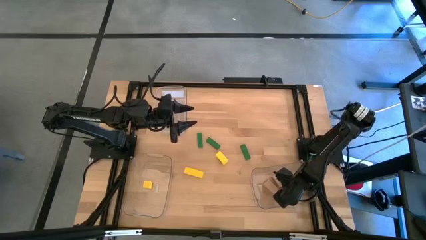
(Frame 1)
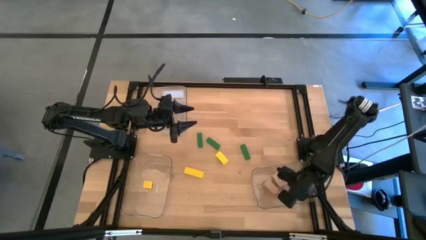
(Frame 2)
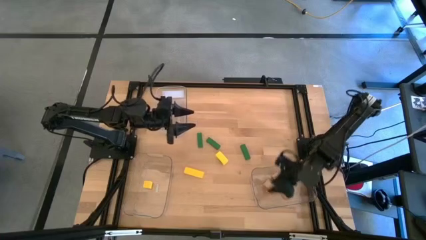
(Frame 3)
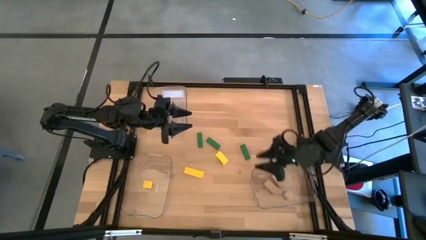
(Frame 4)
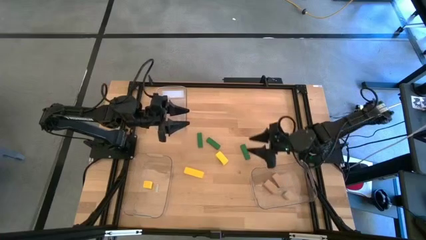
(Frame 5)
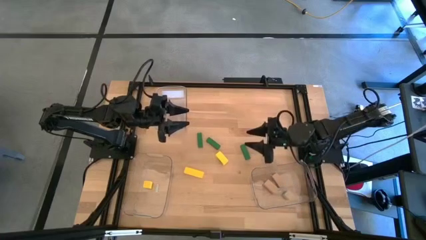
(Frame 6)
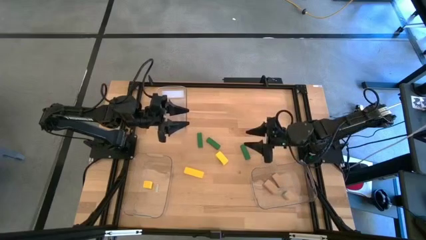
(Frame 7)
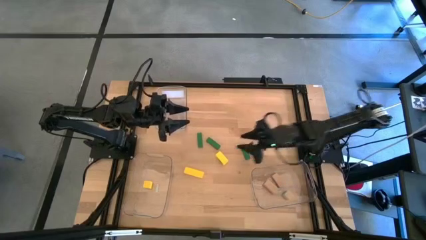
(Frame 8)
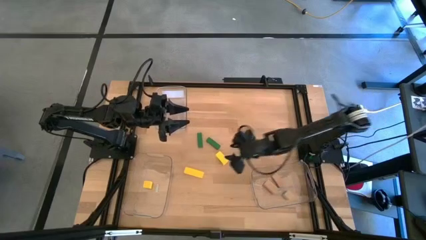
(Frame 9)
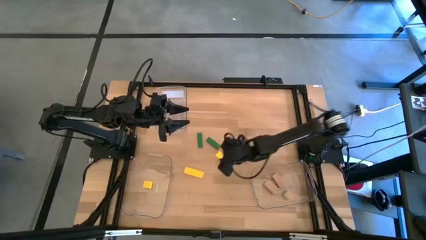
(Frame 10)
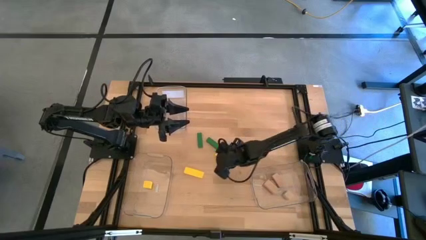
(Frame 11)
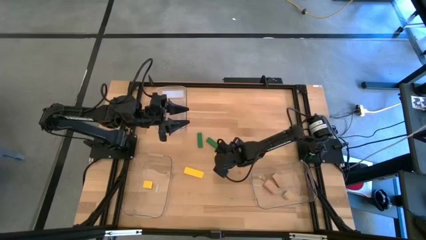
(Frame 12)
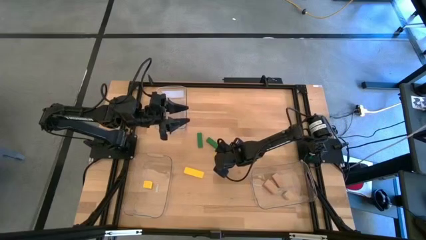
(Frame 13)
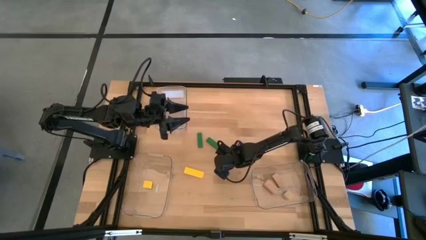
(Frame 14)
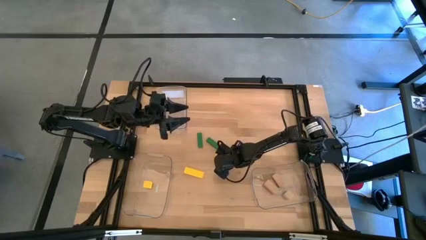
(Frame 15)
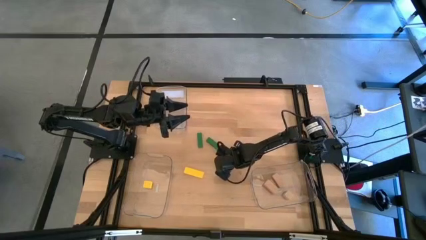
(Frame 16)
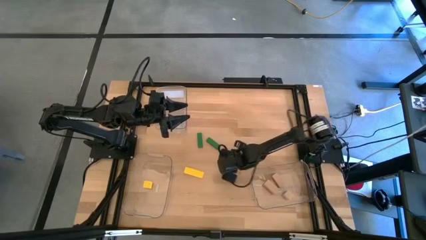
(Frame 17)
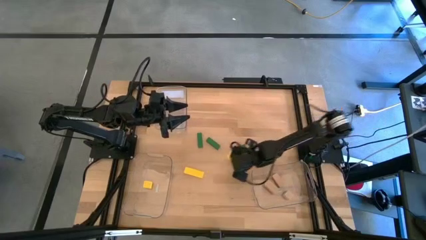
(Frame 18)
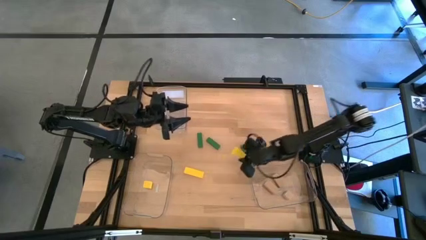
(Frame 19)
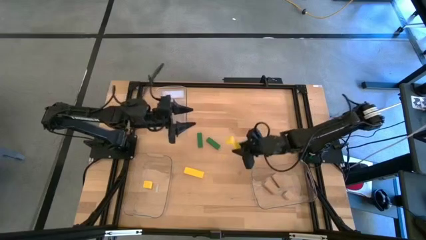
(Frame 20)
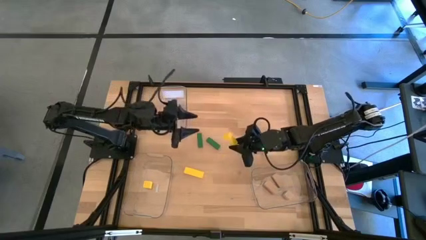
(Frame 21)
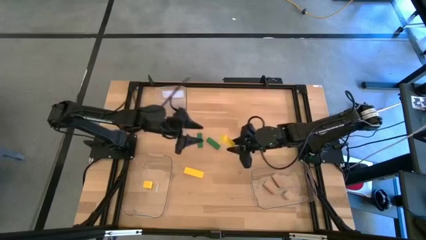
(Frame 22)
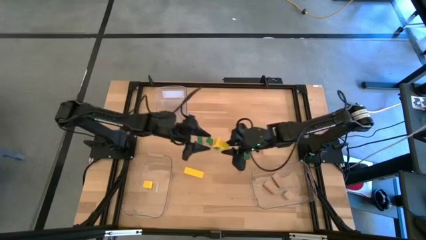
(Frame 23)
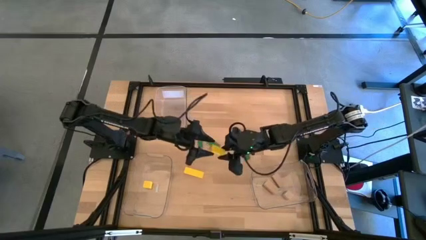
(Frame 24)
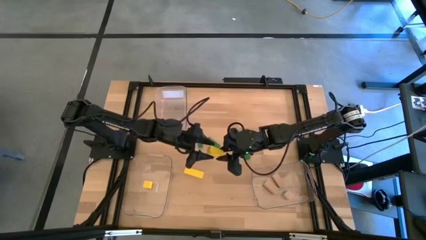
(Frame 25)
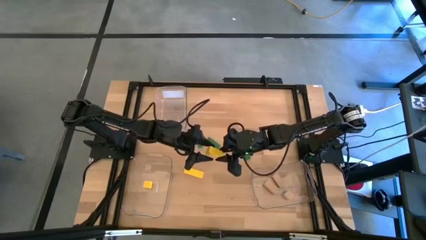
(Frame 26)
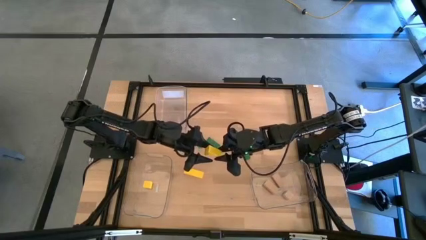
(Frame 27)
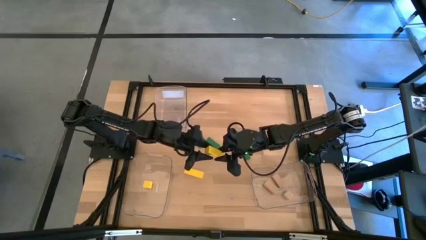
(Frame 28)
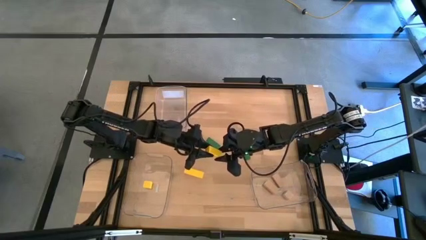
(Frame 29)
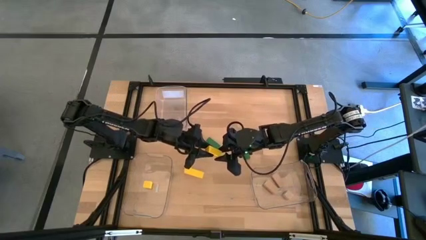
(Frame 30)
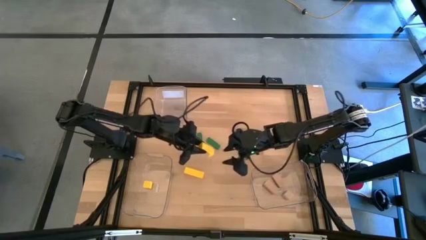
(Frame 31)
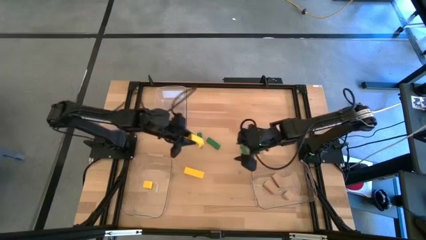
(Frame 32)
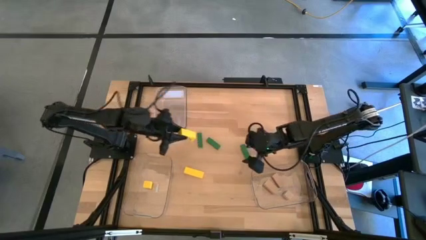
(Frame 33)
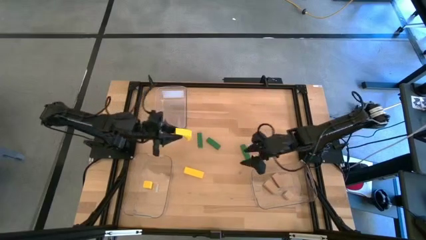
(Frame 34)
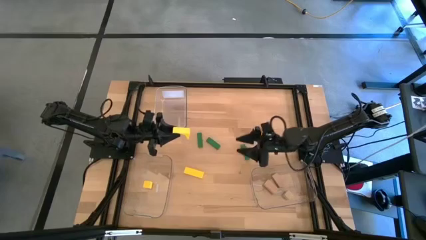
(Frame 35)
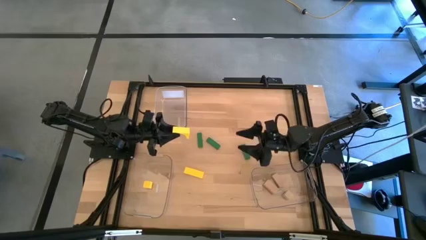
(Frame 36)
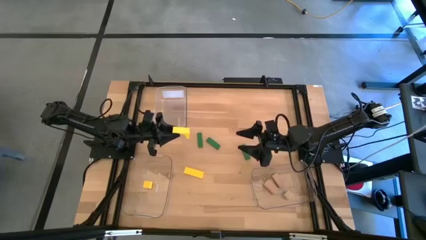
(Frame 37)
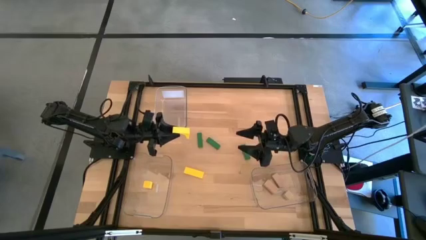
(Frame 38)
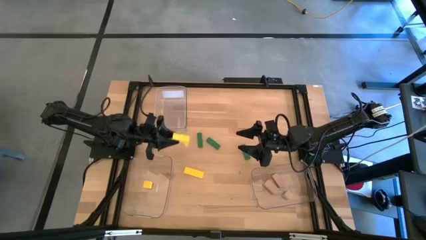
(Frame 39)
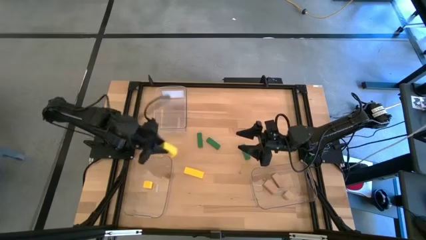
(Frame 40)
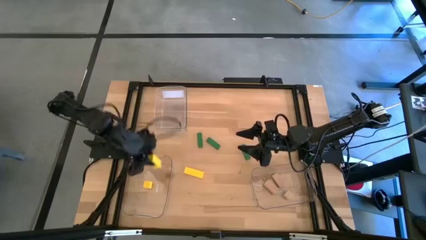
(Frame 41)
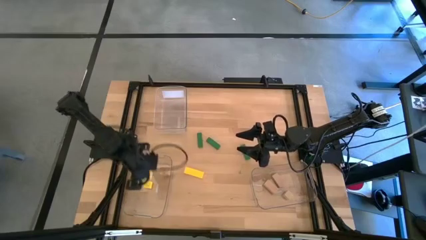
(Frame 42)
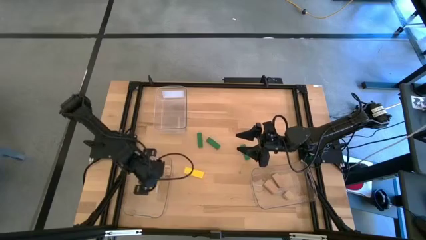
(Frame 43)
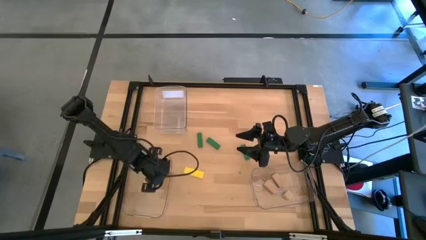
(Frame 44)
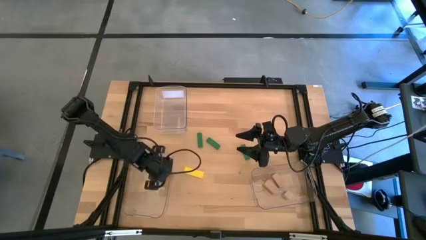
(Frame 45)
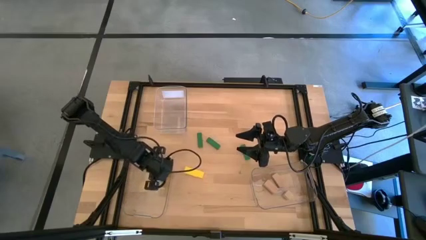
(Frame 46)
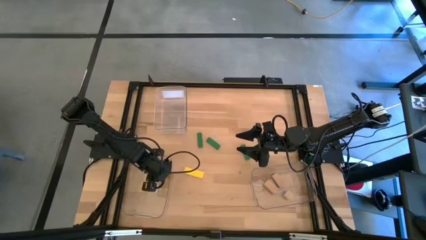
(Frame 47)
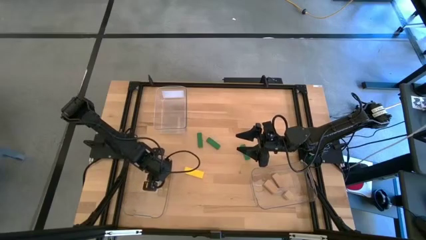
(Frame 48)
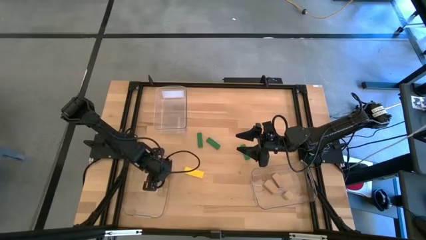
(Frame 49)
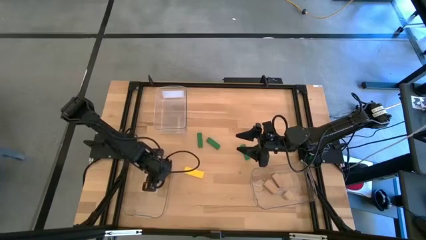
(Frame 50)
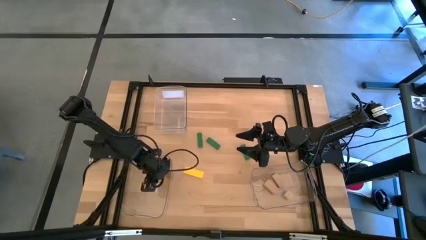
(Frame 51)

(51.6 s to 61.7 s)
Task: Sort & place blocks by color
Put the right yellow block into the bottom left transparent bin

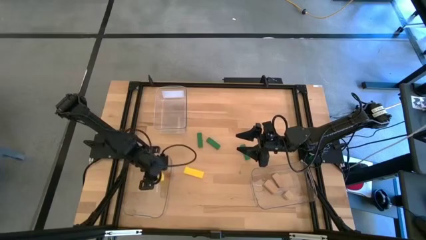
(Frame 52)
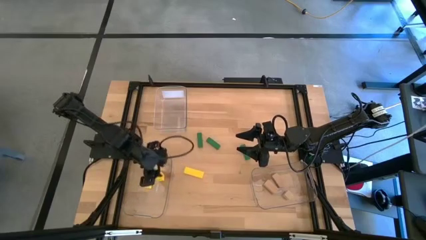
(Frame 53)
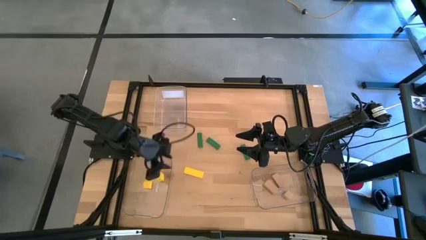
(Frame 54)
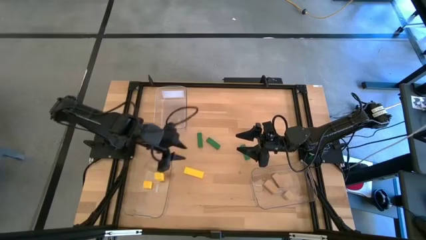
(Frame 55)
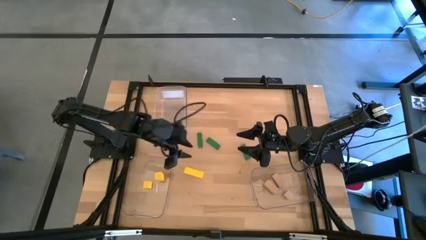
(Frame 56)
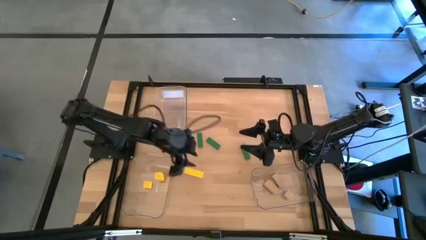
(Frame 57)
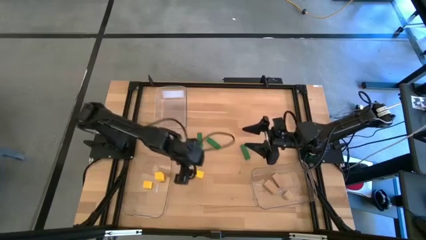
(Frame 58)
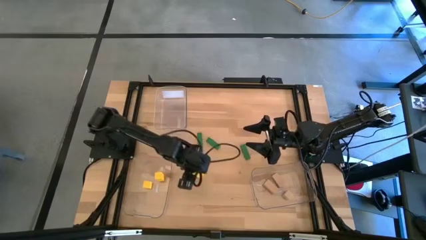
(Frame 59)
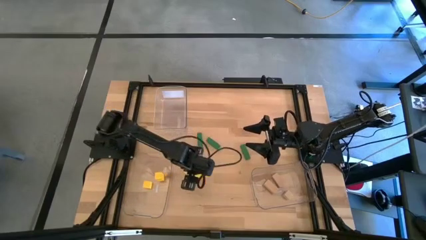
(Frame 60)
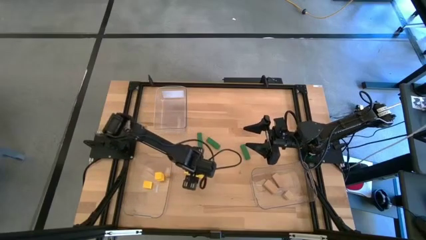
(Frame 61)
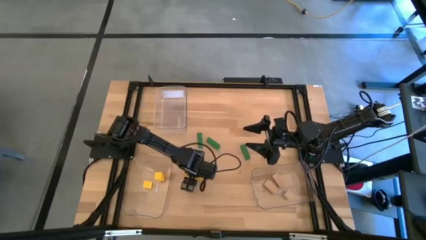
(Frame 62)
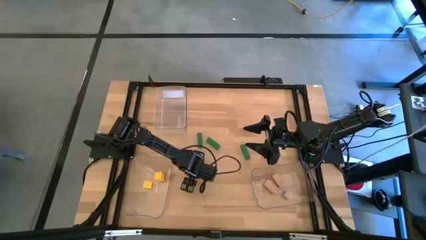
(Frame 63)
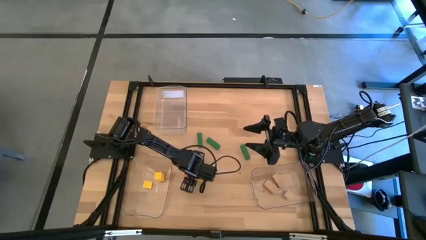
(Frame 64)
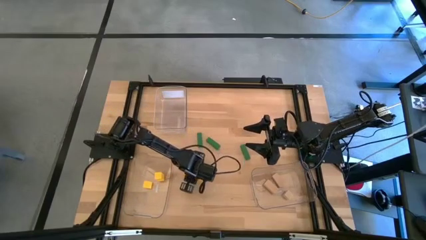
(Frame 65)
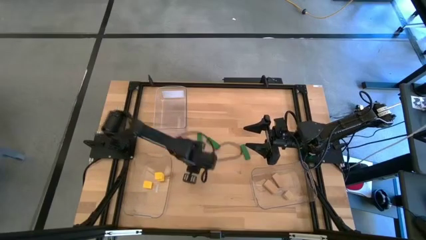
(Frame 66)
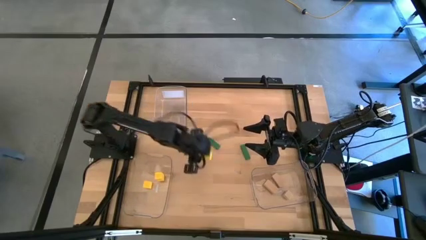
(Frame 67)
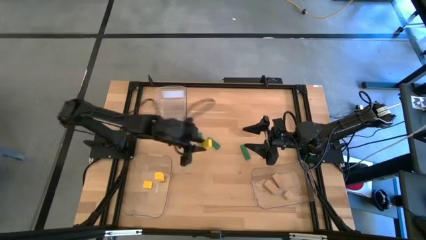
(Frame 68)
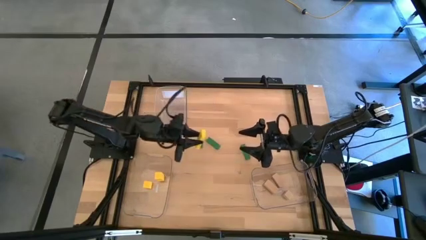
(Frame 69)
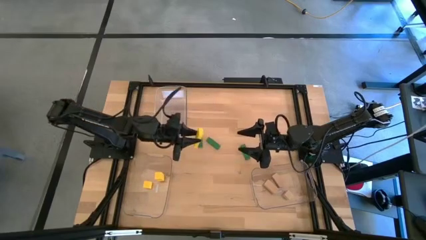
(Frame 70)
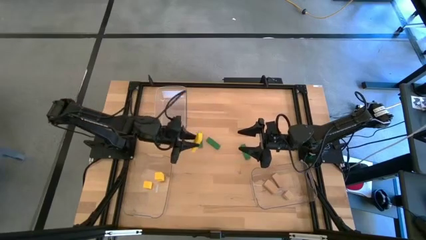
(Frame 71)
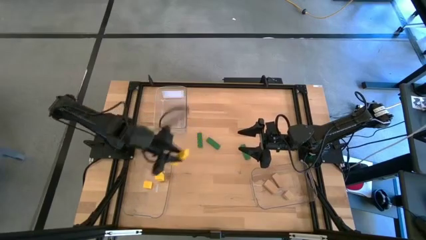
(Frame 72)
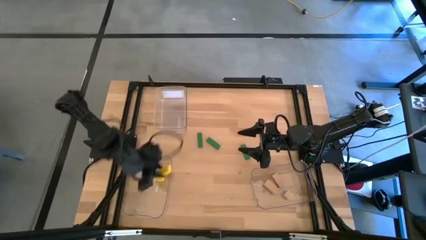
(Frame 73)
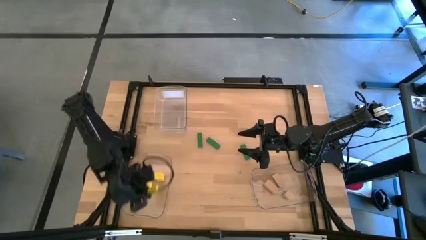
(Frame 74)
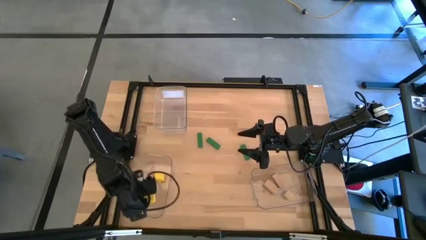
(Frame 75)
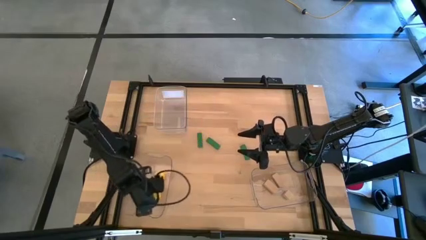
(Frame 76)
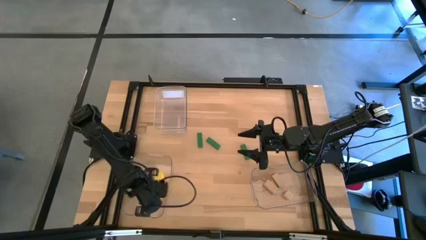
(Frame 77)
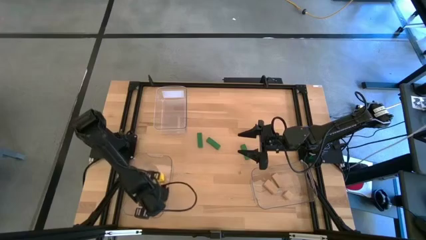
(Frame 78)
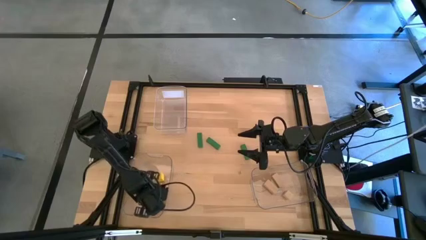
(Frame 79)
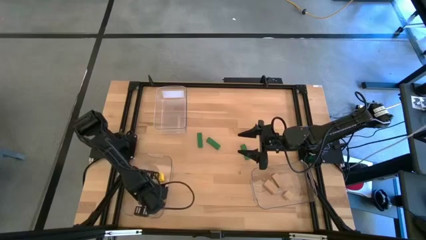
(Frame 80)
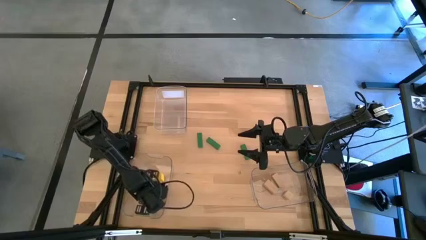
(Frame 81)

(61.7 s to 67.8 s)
Put the yellow block into the bottom left transparent bin
